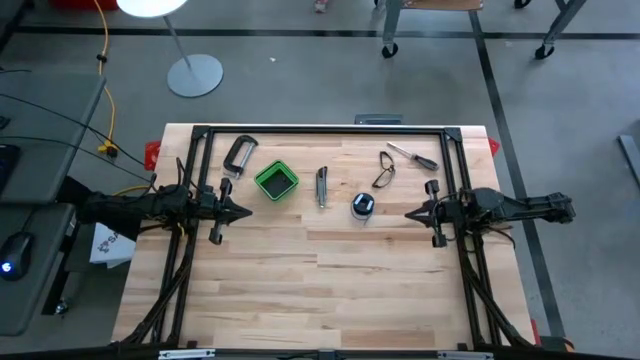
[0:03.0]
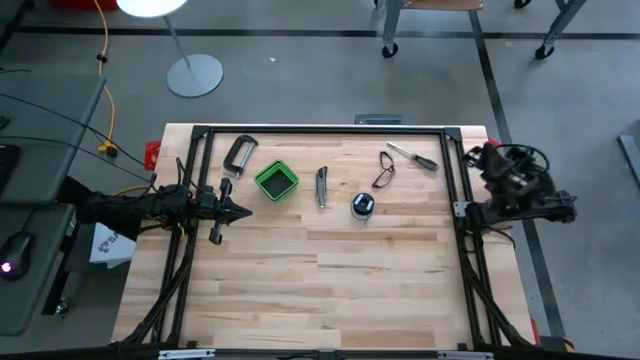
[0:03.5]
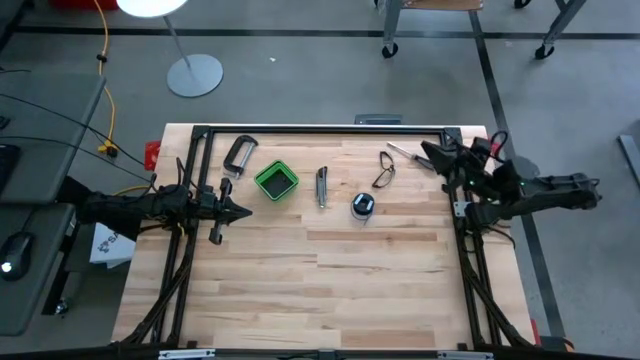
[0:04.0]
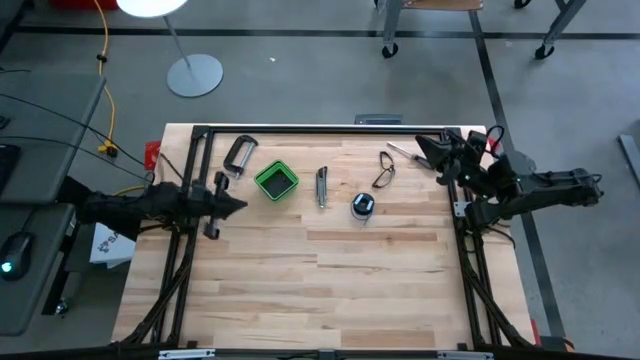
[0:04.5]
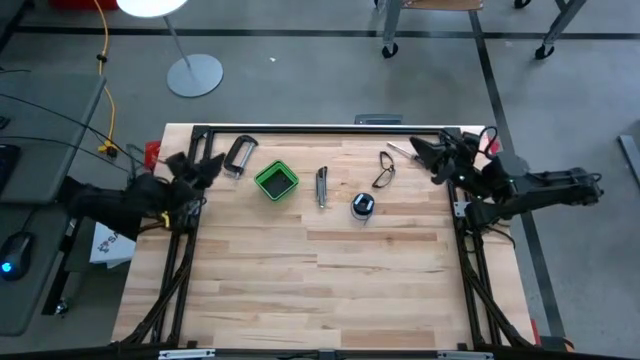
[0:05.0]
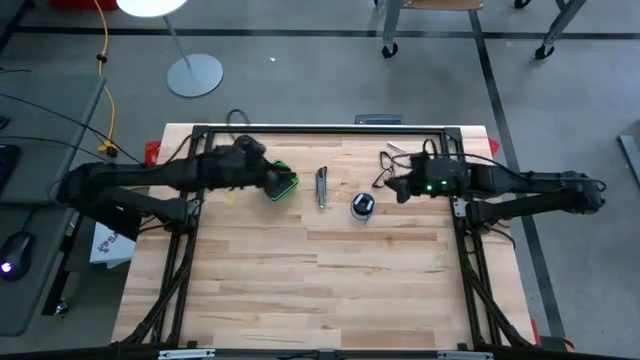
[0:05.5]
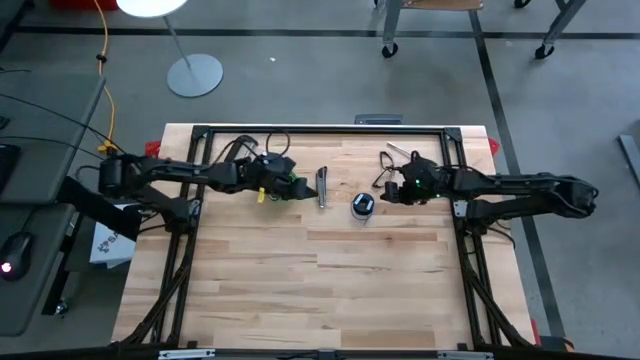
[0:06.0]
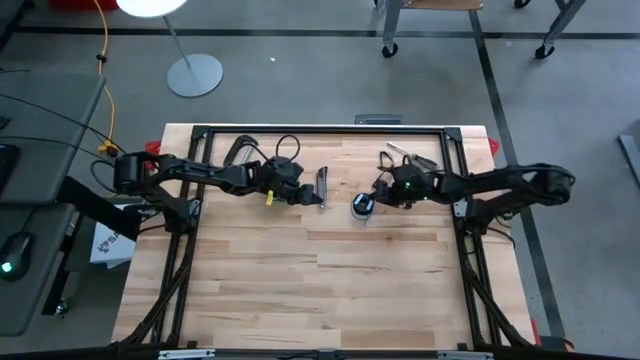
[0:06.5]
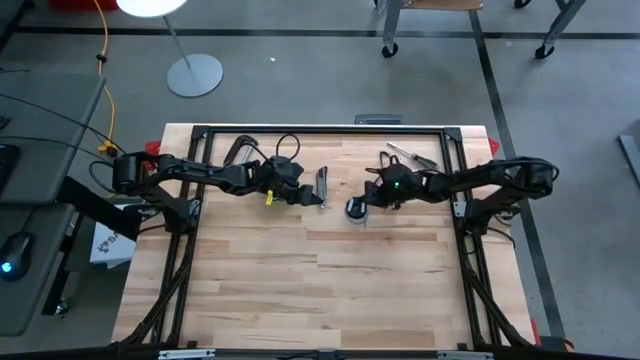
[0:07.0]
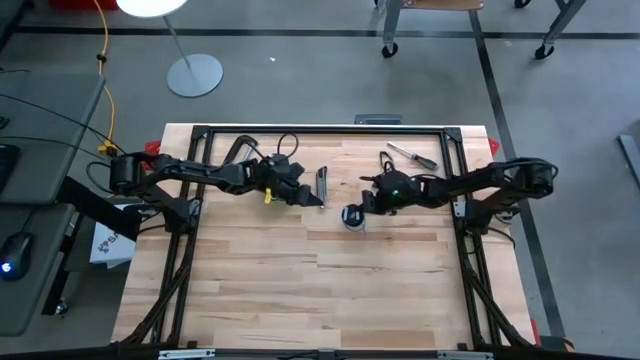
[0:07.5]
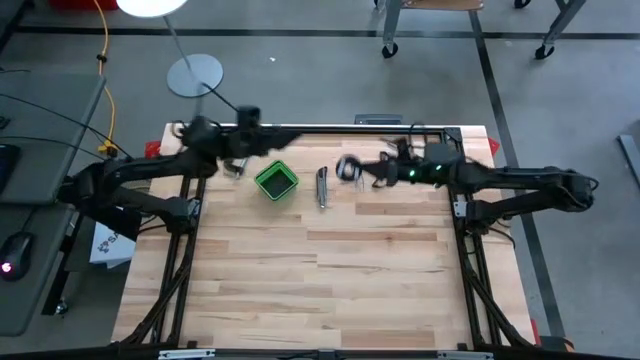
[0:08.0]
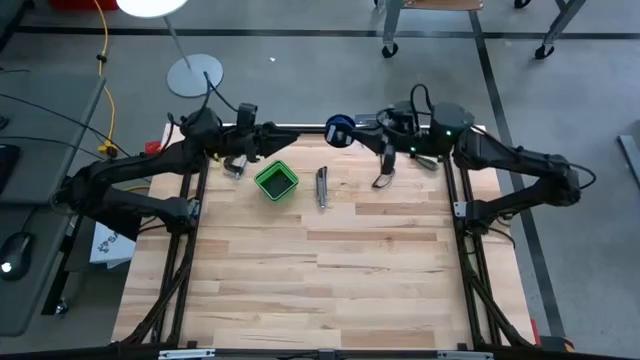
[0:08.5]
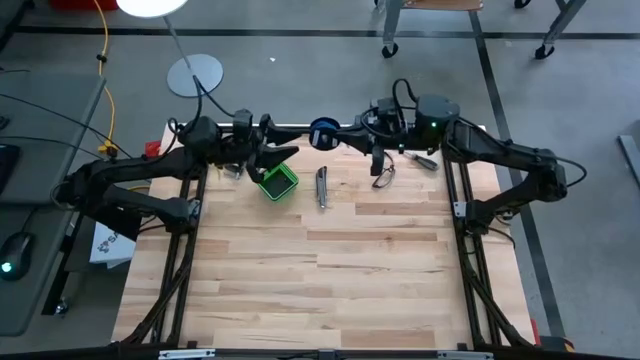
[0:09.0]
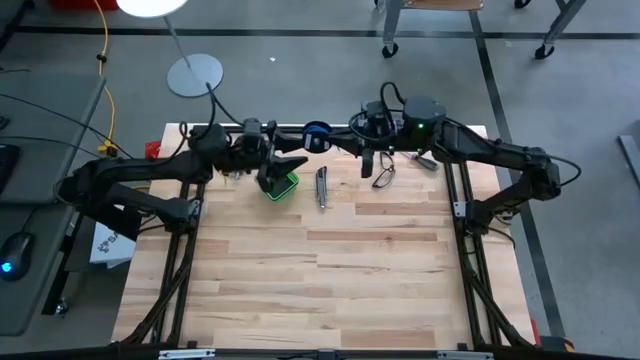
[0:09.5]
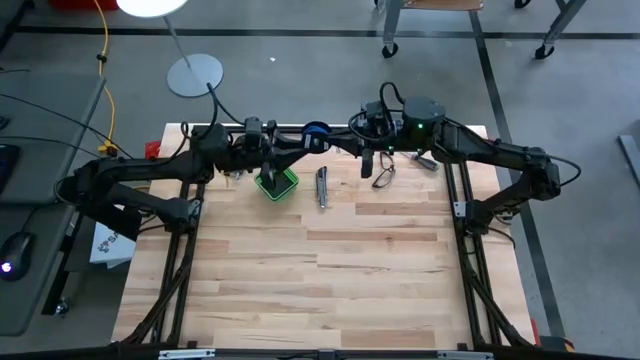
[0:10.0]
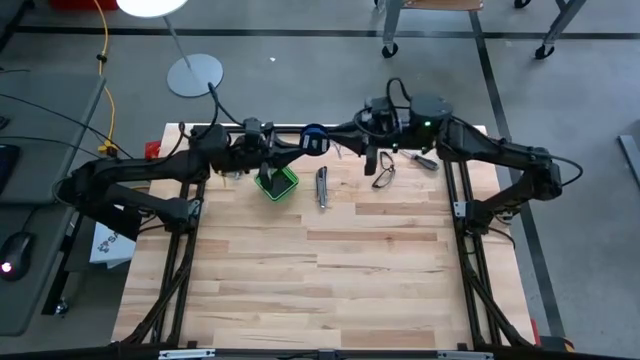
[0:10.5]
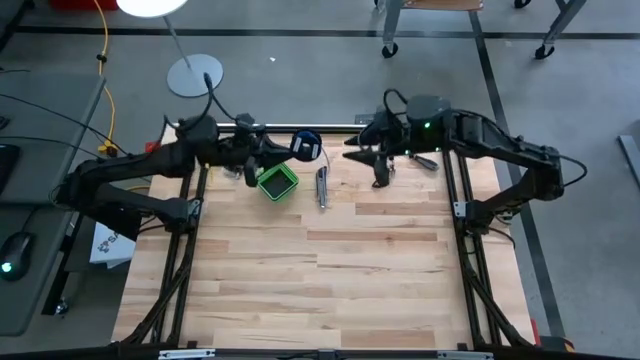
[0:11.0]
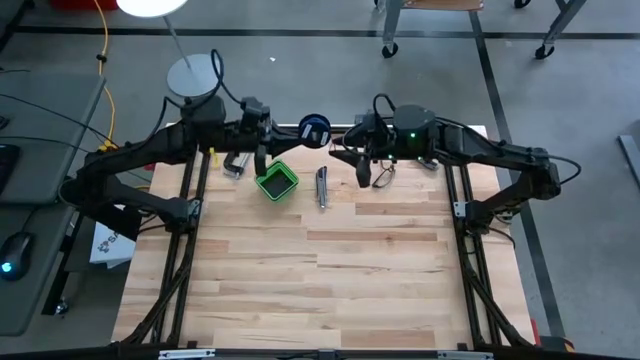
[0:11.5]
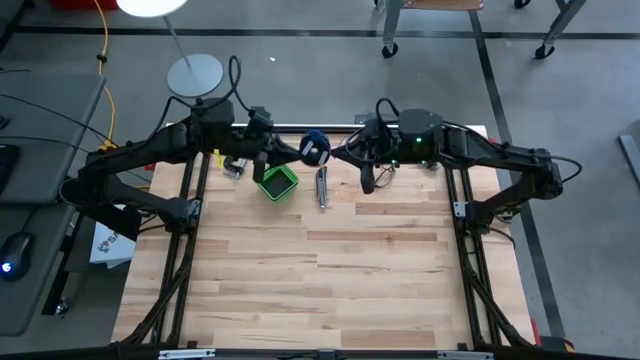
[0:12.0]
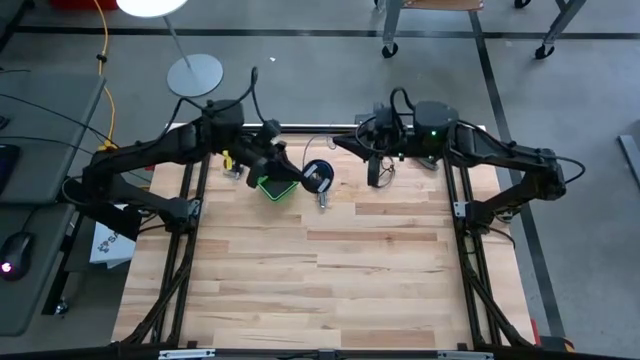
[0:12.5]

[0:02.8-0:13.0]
Task: Coil cords
Uncoil the blue wire from the spool

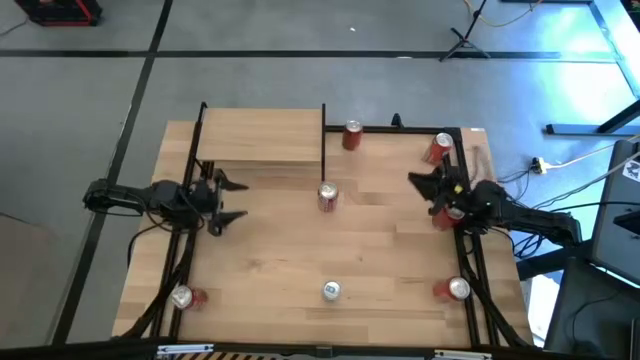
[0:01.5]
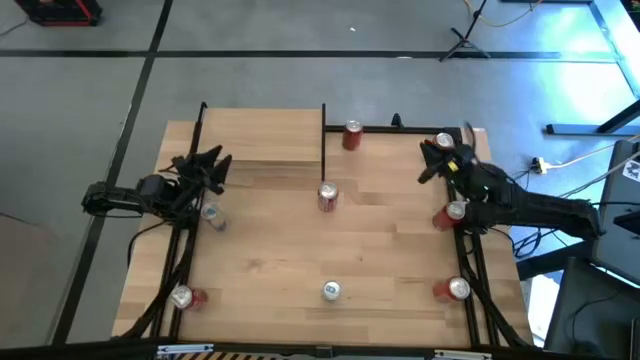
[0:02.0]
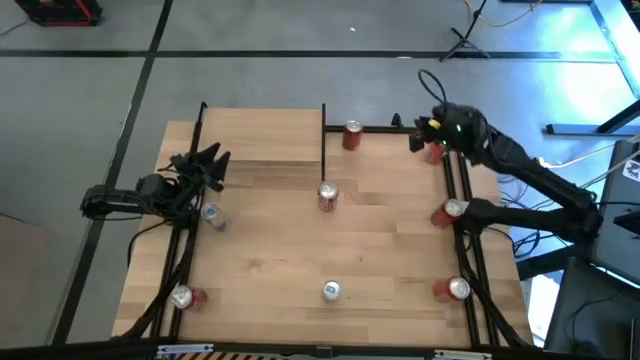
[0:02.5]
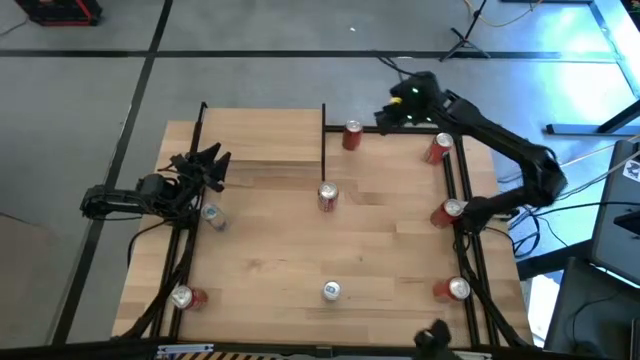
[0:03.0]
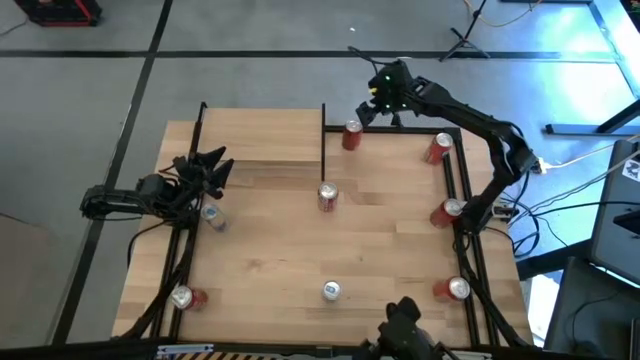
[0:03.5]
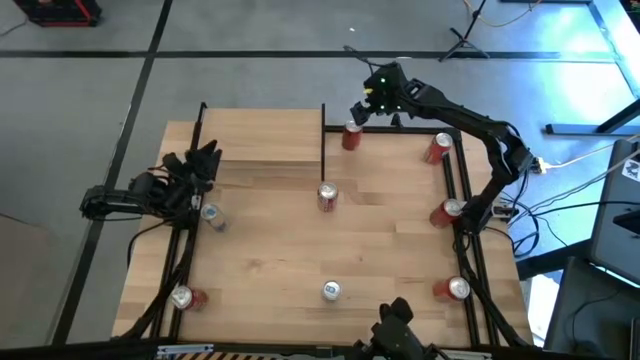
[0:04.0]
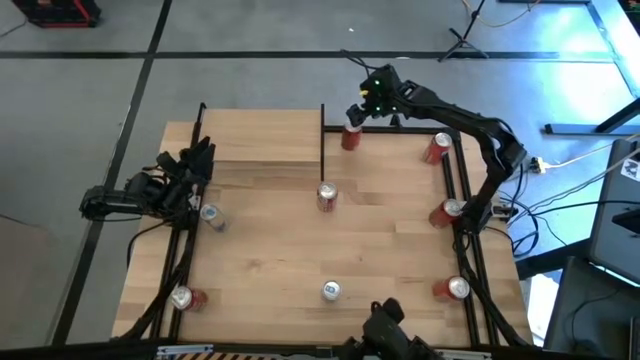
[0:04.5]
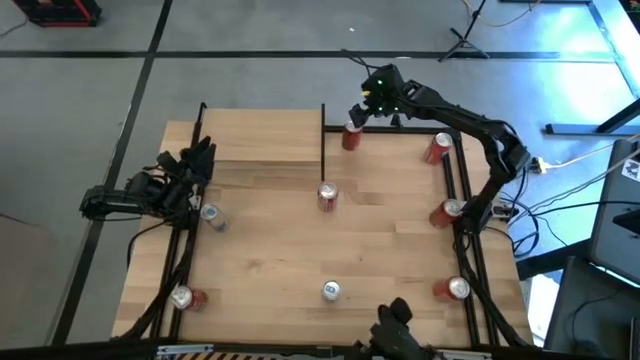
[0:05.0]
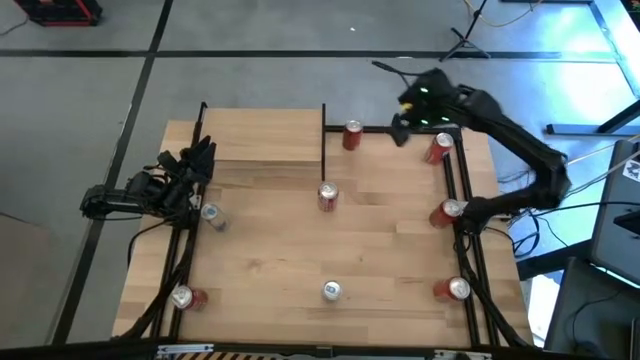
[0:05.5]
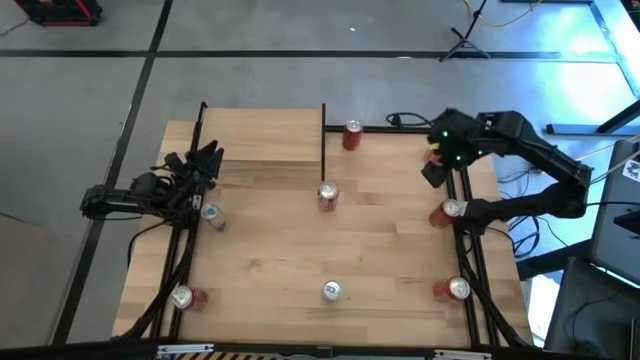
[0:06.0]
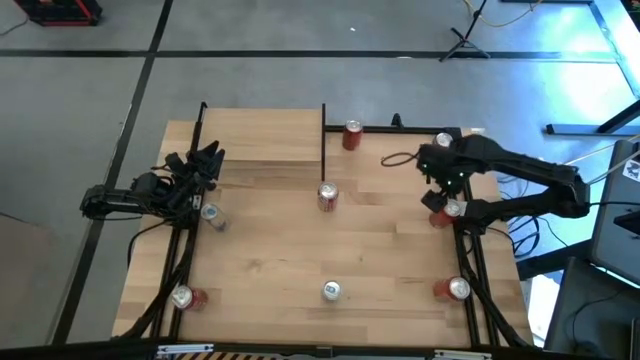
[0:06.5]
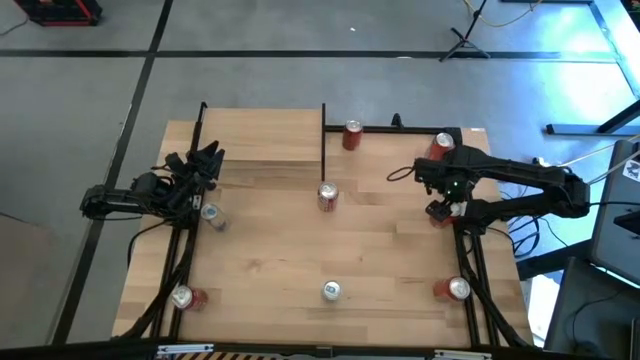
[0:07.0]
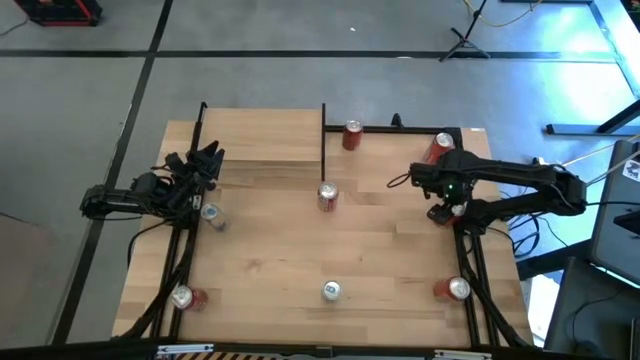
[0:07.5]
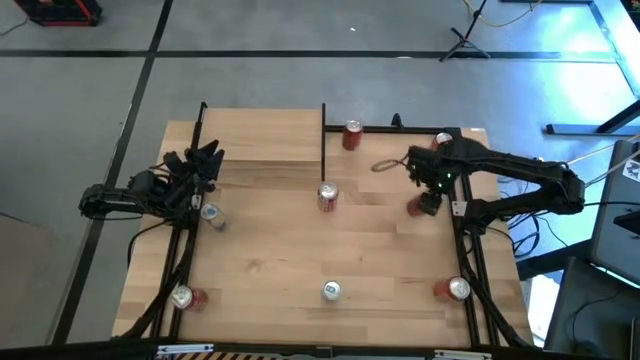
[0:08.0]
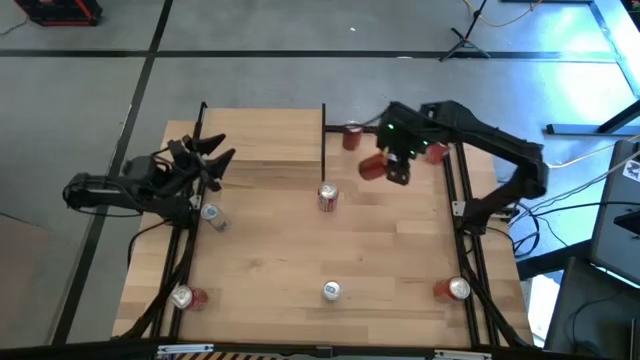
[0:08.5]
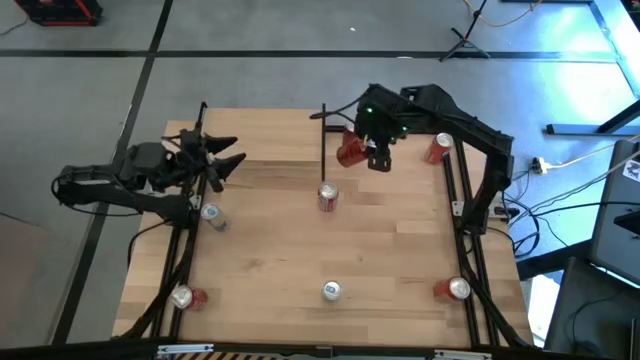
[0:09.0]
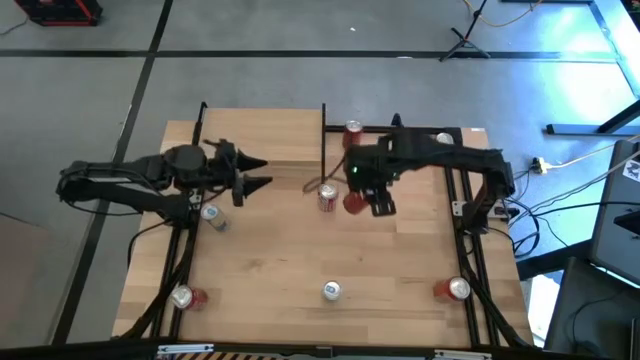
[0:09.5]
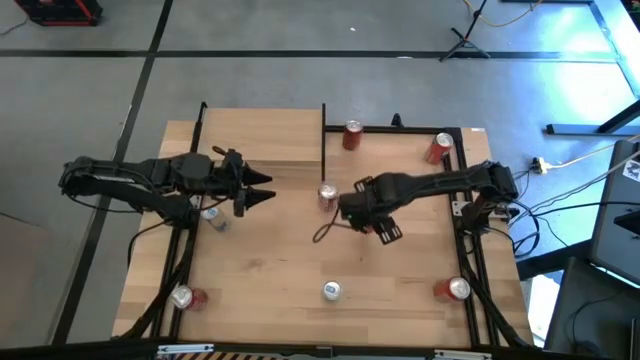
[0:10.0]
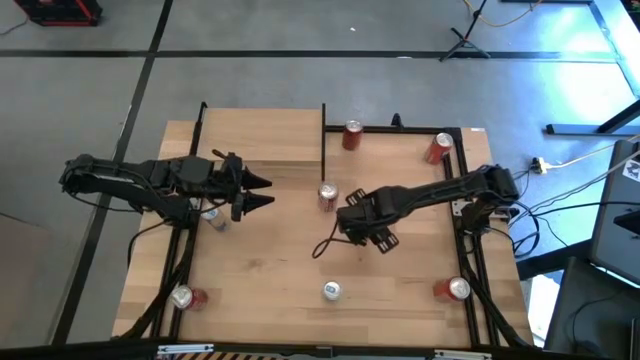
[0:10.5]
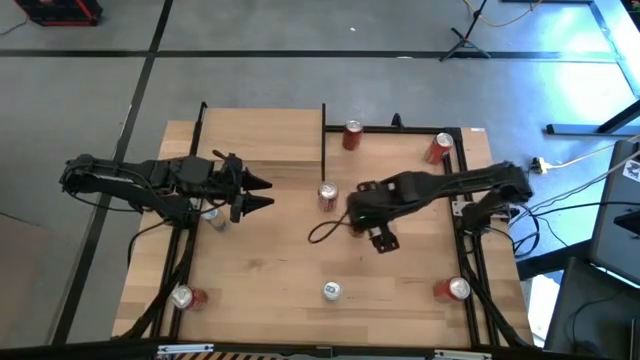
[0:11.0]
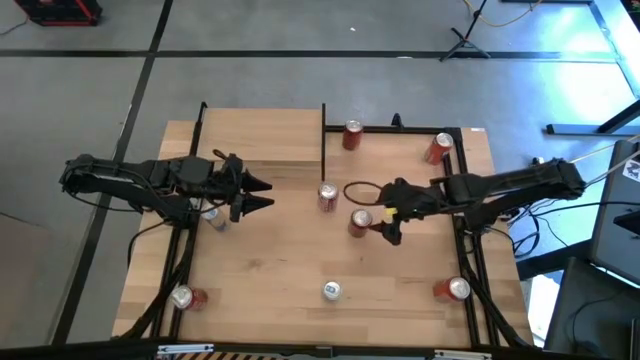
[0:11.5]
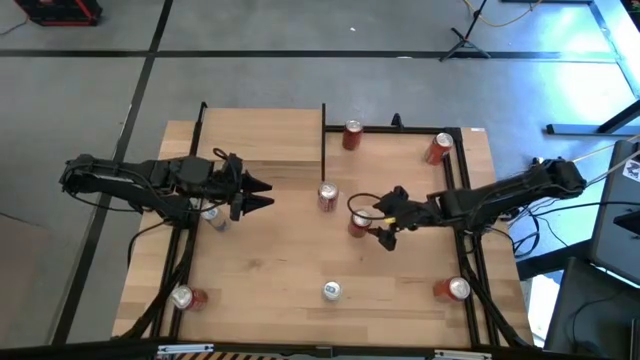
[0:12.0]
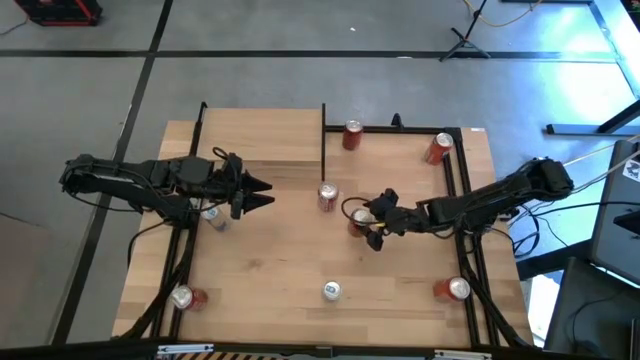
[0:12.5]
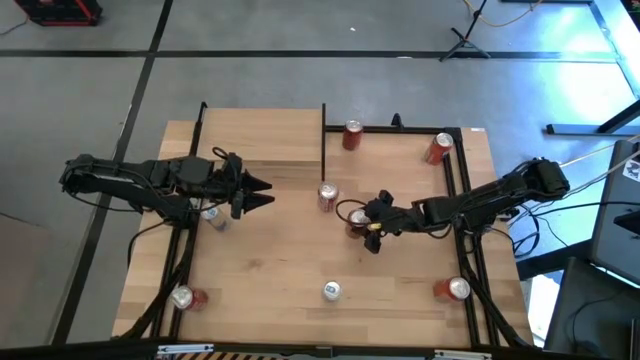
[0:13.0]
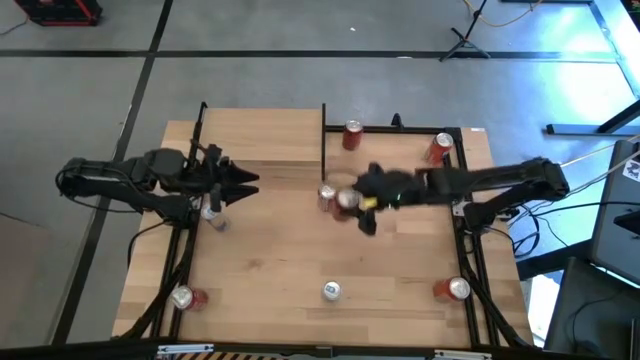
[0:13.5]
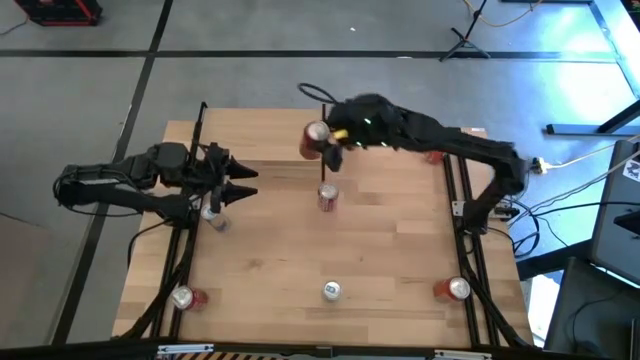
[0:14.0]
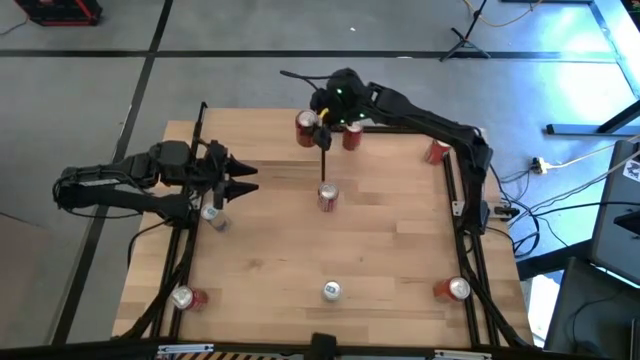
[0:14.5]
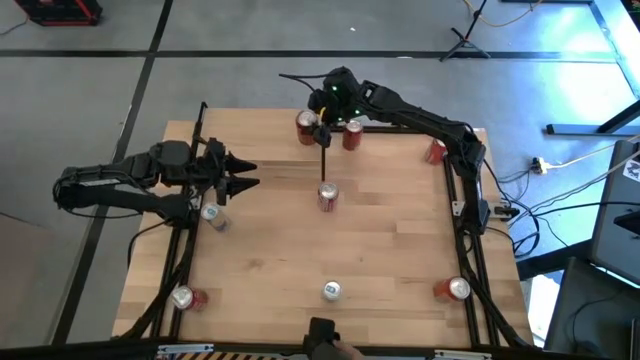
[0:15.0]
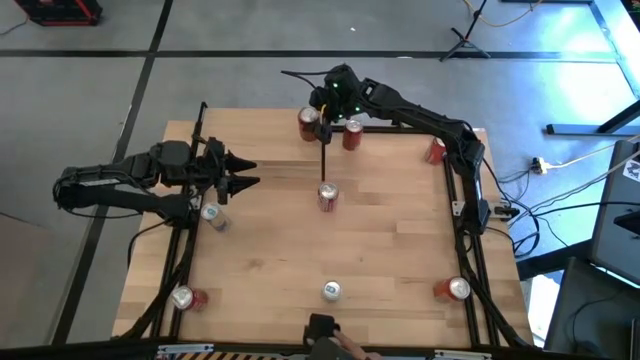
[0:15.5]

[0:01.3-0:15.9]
Task: Place canned beverage on shelf
Put the bottom red black soda can on the shelf
